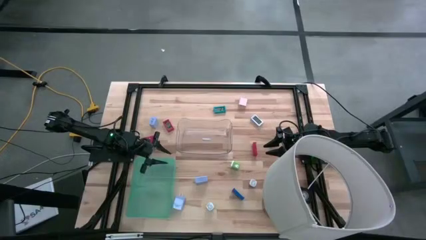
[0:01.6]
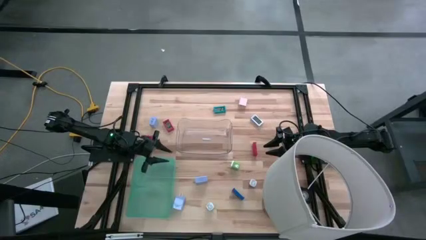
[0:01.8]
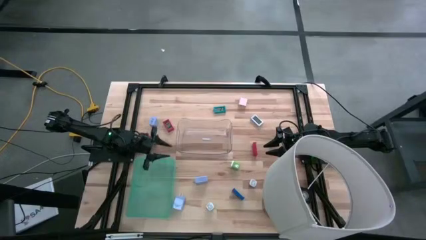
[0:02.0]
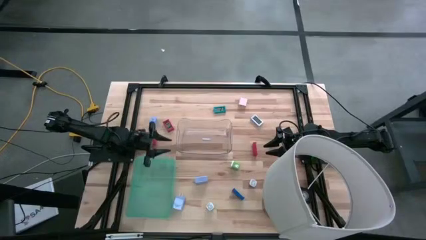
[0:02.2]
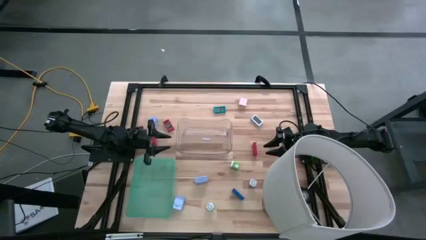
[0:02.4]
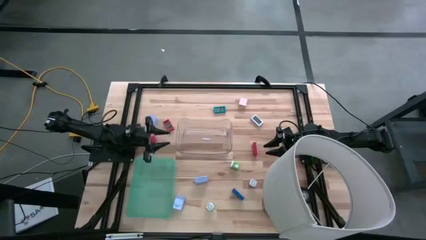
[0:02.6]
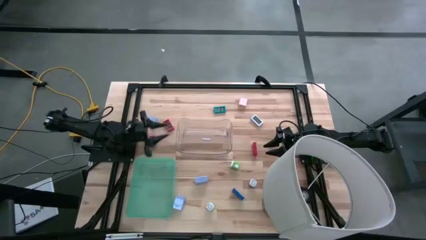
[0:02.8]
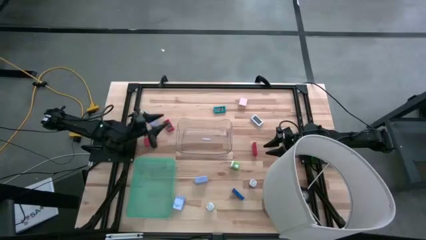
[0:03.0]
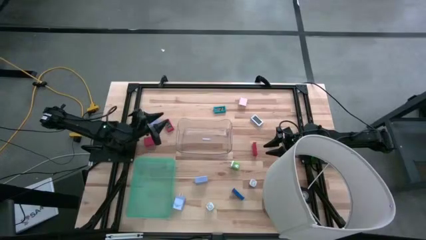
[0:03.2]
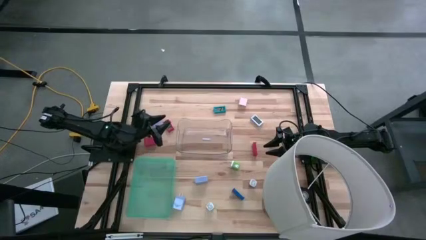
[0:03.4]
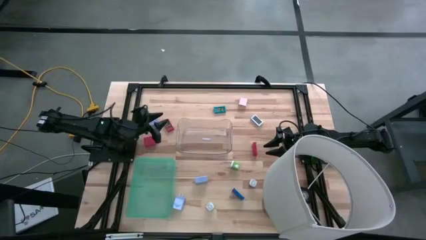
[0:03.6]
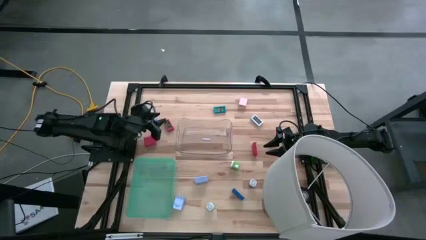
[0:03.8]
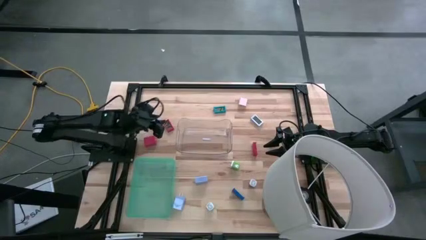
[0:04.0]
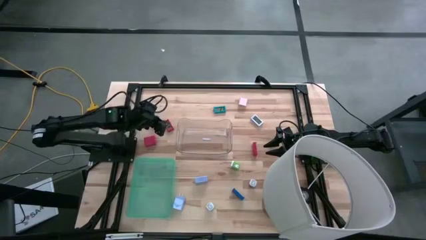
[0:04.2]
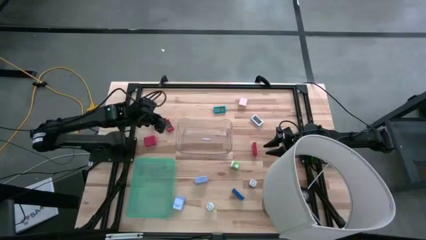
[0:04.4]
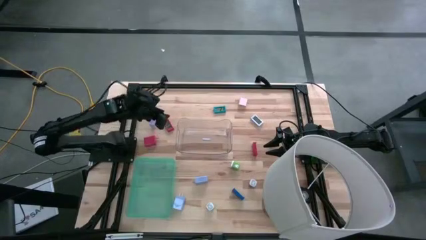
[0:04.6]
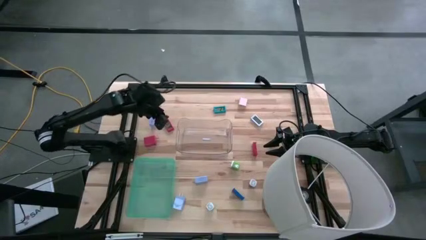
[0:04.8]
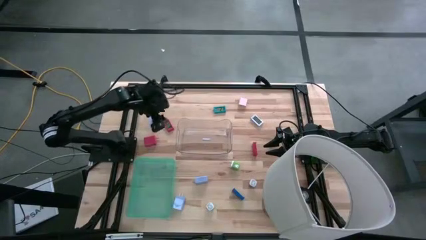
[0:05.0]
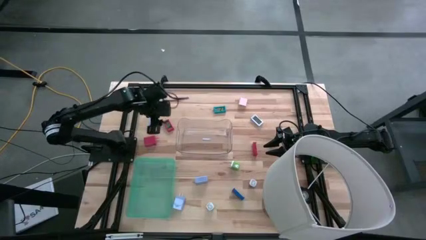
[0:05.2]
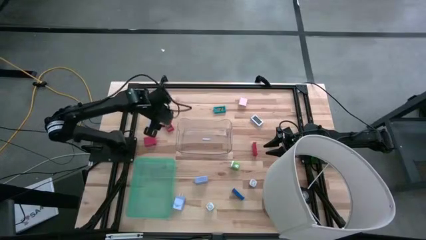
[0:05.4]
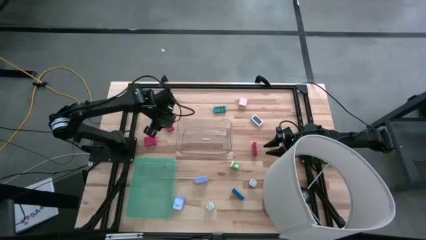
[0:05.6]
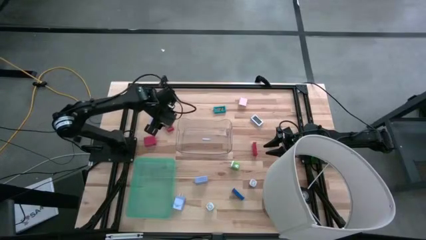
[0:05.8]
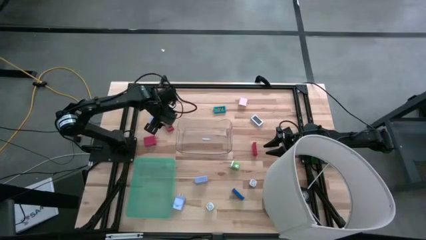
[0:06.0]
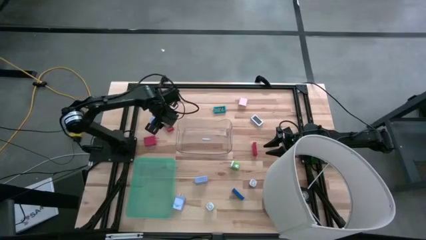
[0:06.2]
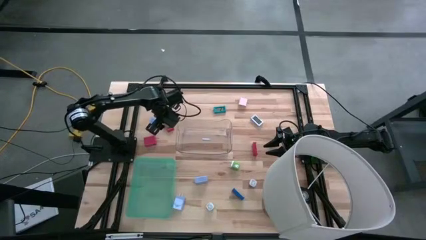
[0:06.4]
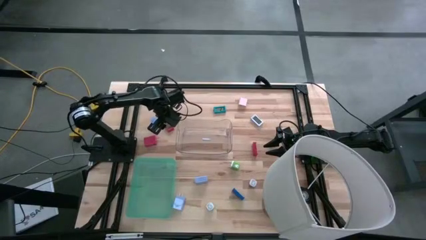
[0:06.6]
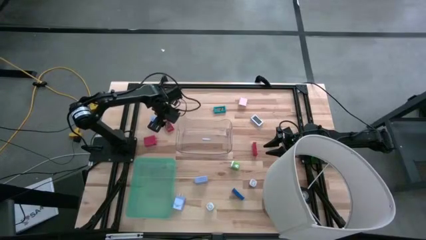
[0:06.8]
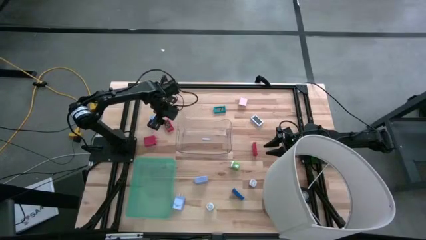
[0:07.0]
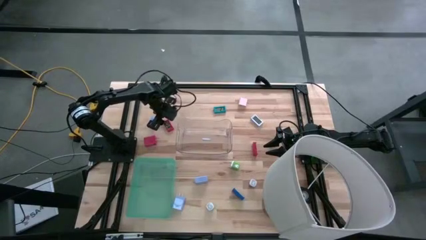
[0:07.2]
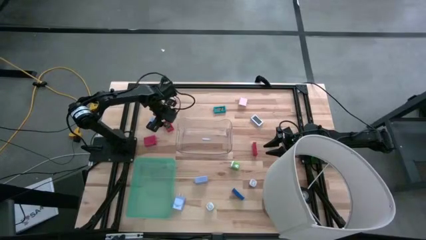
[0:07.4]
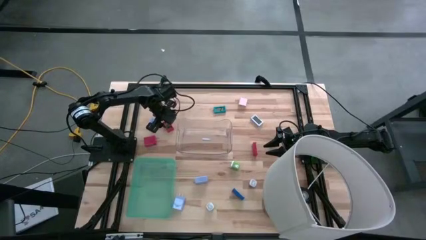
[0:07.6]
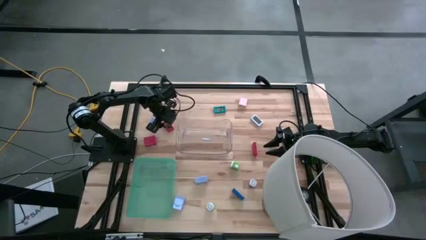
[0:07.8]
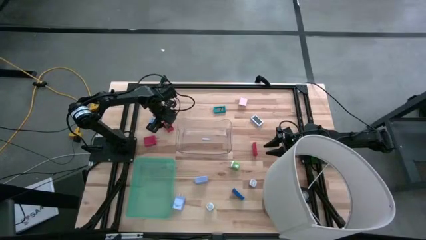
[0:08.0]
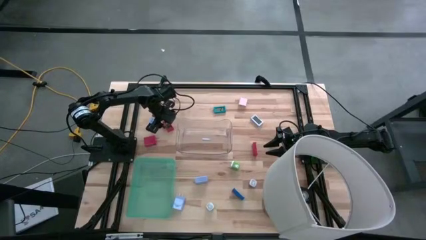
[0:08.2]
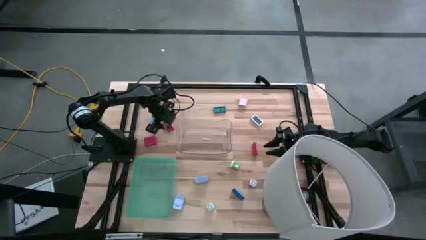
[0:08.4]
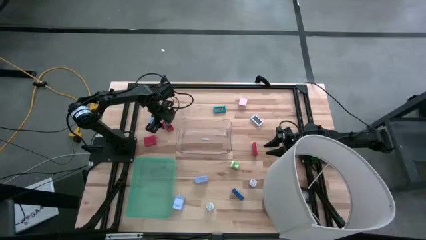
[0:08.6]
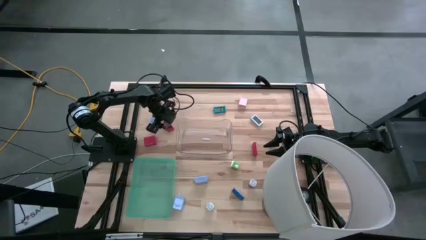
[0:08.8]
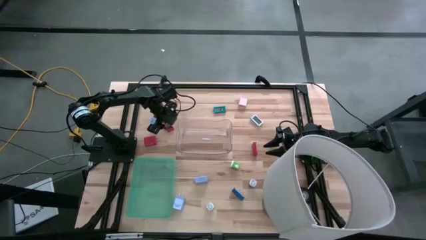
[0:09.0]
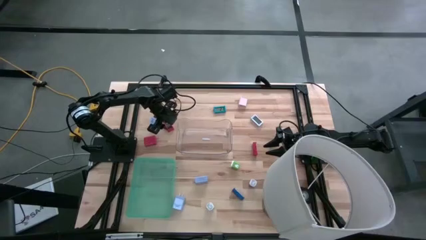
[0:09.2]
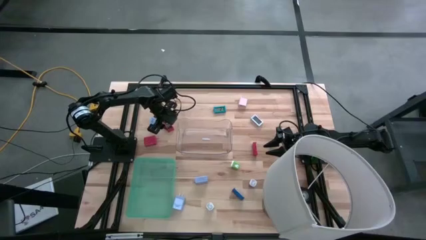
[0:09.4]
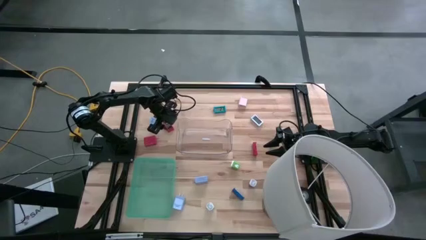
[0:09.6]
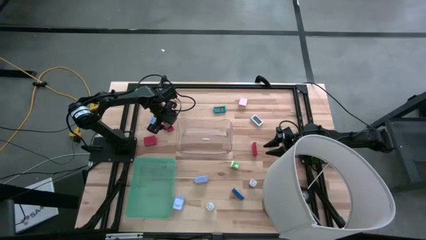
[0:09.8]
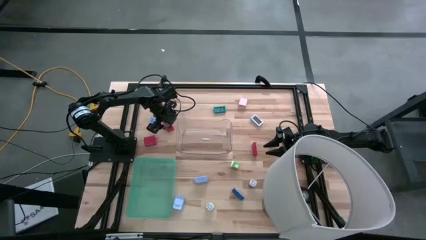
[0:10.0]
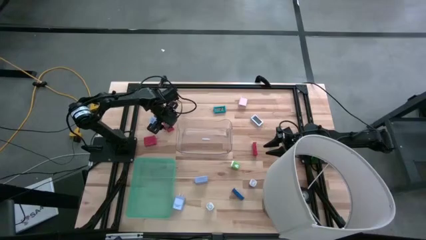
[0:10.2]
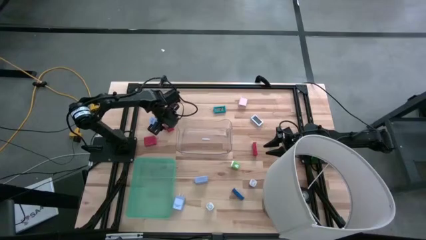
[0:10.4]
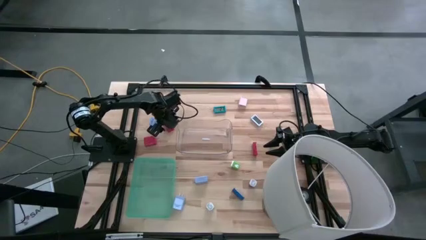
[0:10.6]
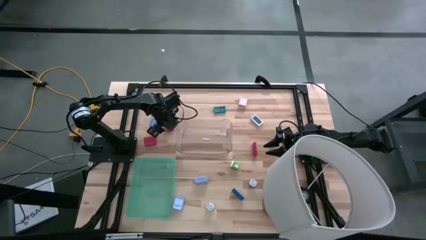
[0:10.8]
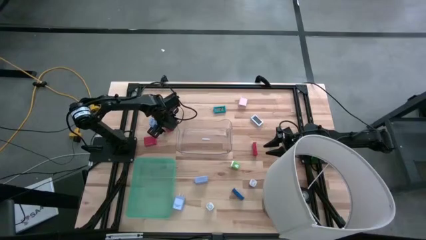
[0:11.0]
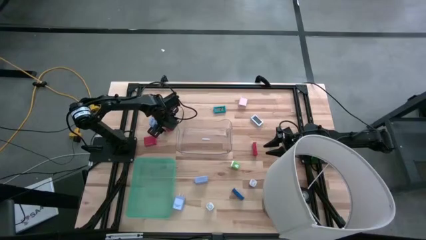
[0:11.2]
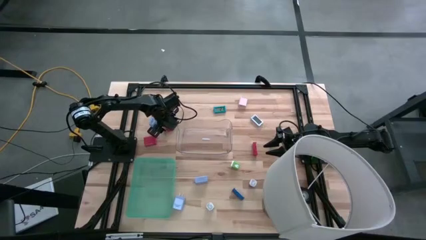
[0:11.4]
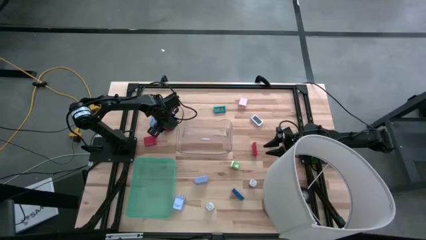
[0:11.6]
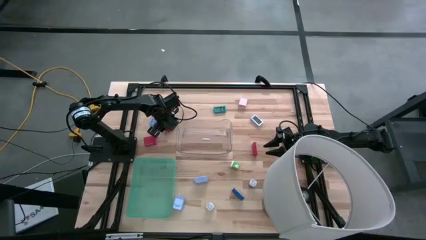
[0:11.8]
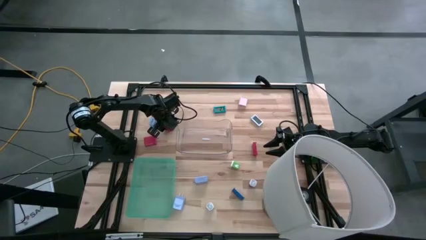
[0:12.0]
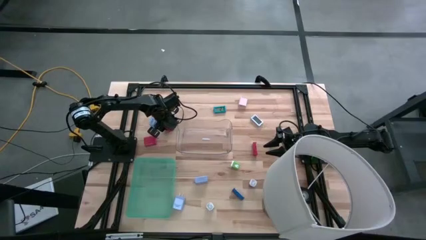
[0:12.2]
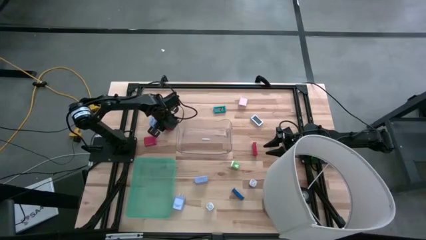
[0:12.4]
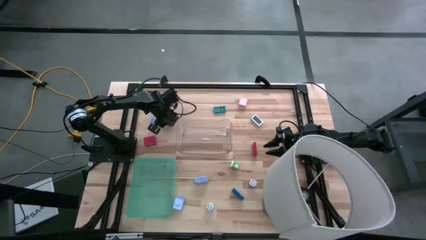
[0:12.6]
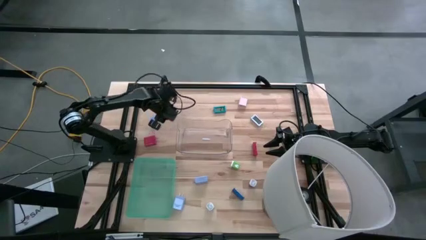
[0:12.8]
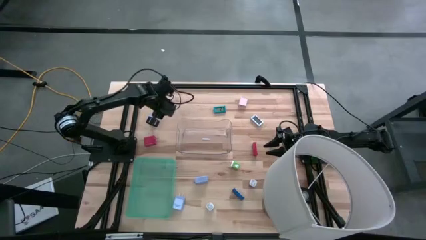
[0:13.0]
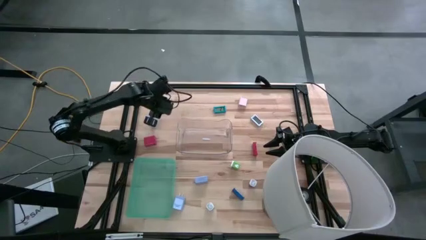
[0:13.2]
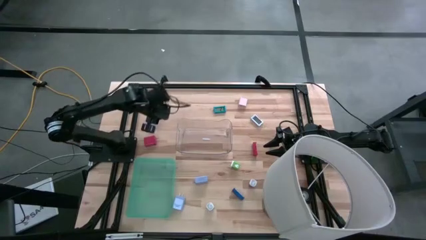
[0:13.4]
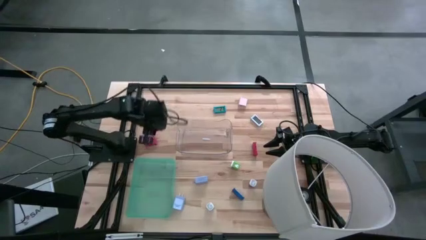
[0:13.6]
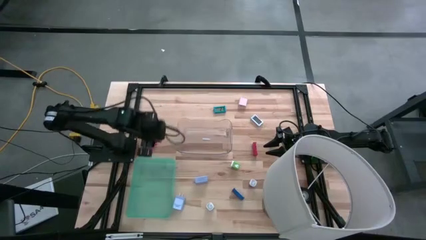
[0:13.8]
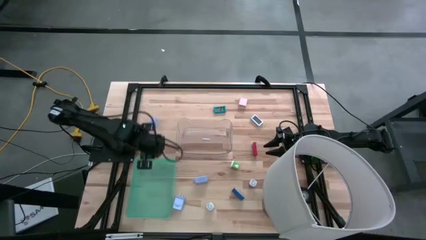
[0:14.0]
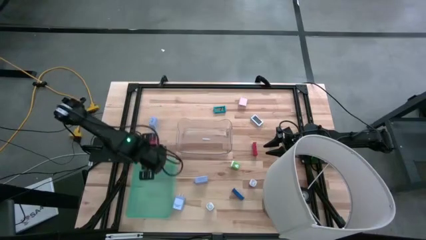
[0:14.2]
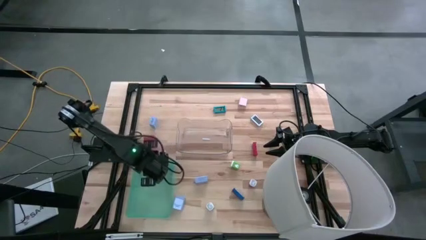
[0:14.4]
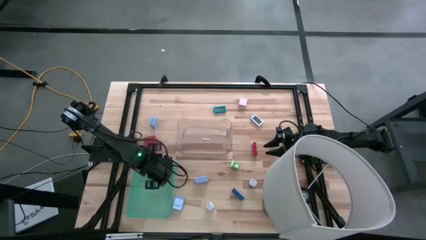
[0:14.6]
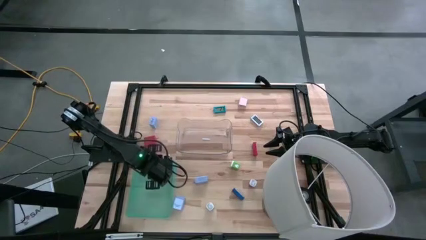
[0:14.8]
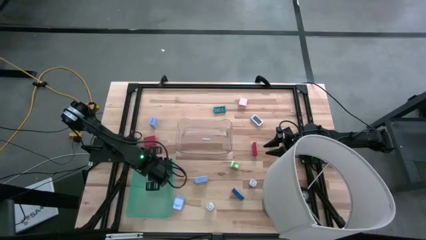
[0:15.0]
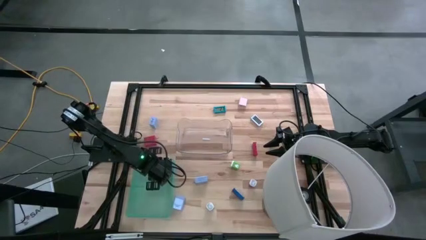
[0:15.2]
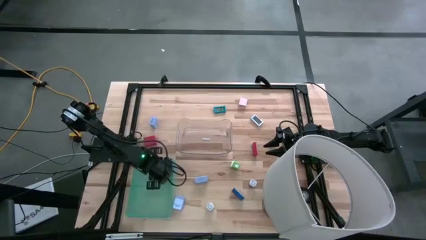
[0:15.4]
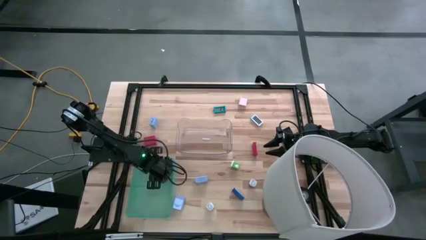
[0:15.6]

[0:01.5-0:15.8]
Task: Pick & Place Office items
Put the top red digital clock into the green bin
